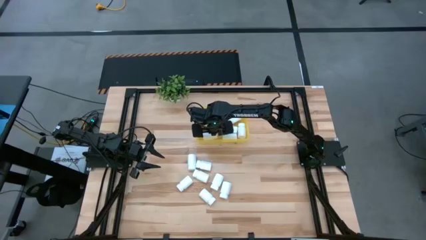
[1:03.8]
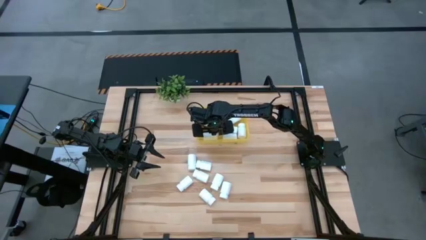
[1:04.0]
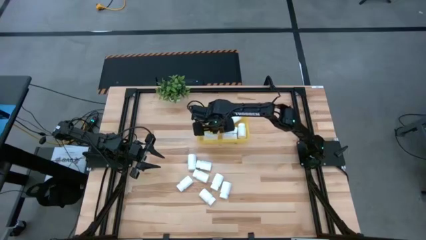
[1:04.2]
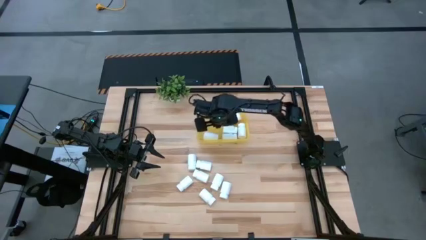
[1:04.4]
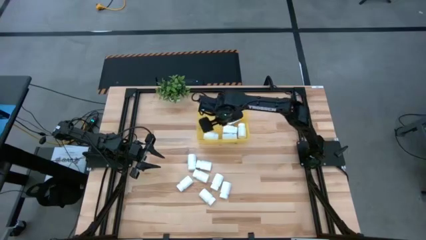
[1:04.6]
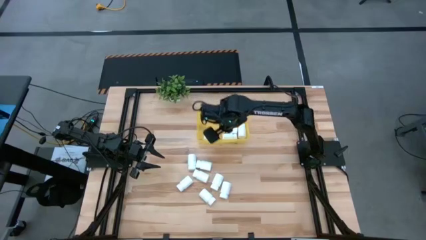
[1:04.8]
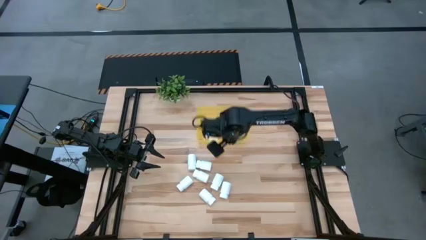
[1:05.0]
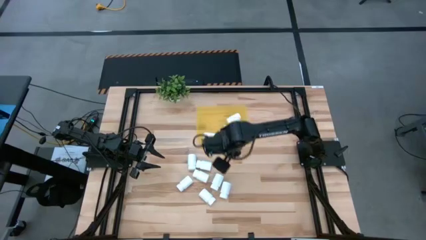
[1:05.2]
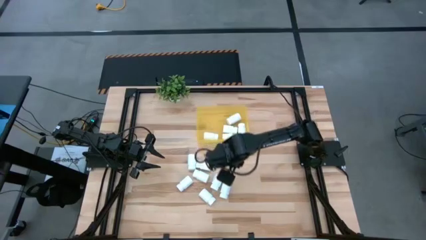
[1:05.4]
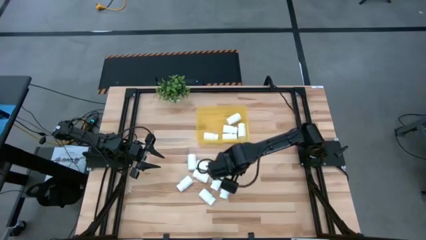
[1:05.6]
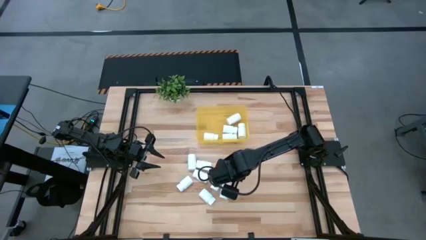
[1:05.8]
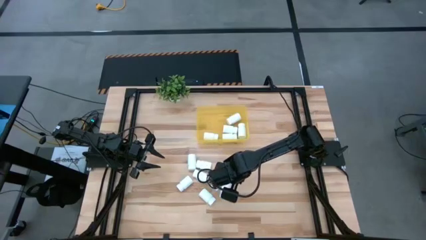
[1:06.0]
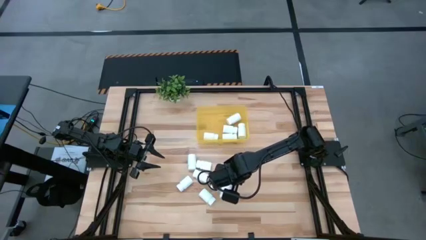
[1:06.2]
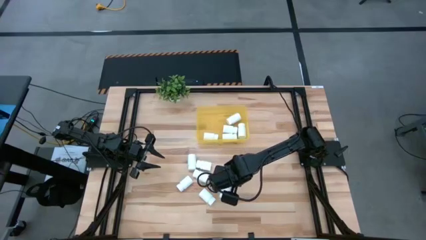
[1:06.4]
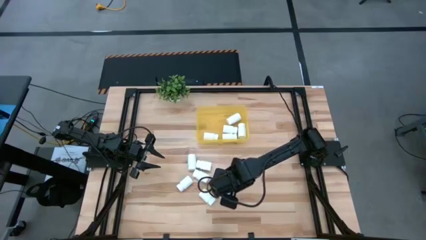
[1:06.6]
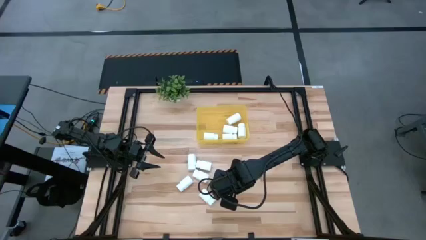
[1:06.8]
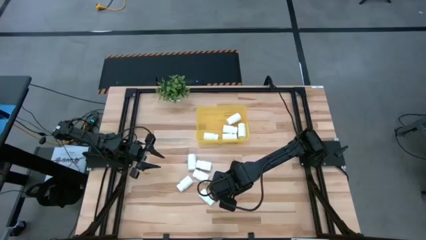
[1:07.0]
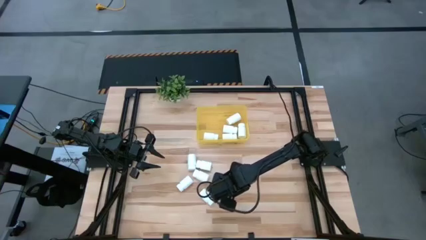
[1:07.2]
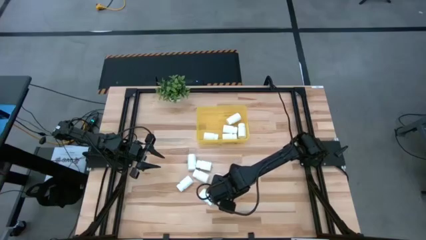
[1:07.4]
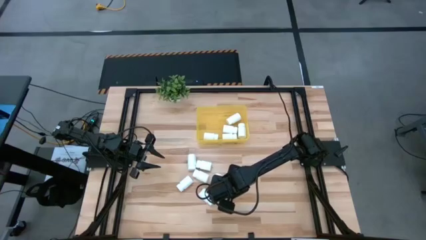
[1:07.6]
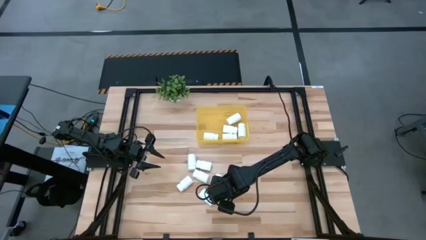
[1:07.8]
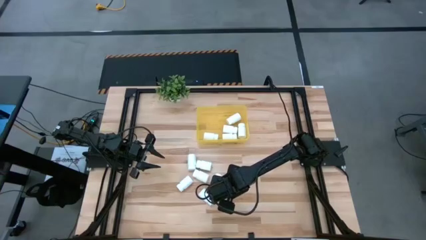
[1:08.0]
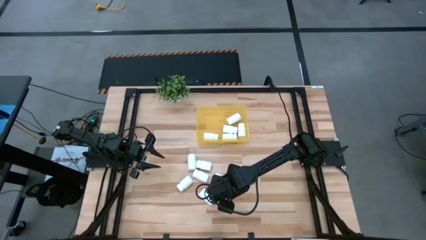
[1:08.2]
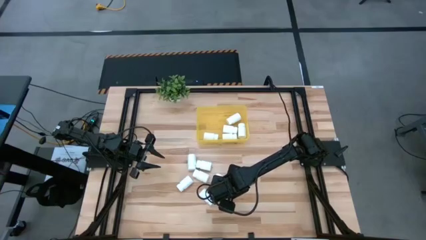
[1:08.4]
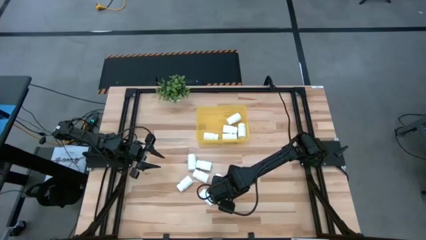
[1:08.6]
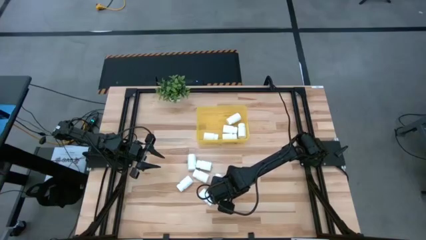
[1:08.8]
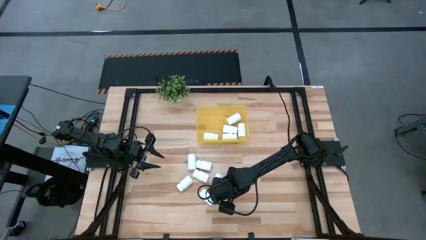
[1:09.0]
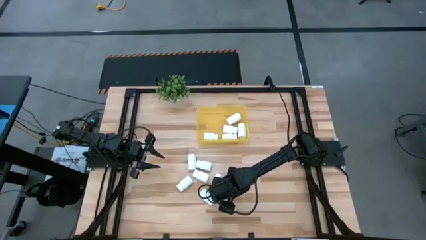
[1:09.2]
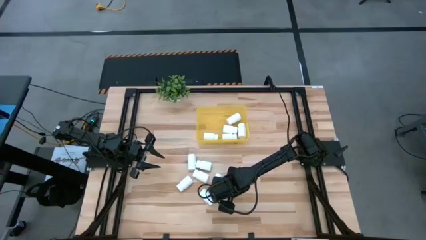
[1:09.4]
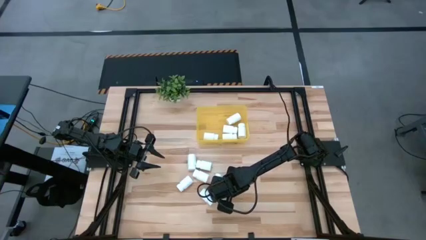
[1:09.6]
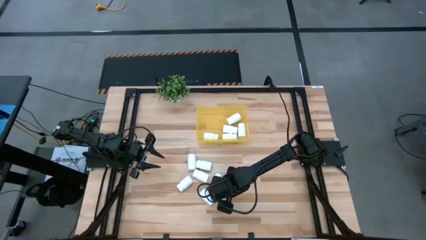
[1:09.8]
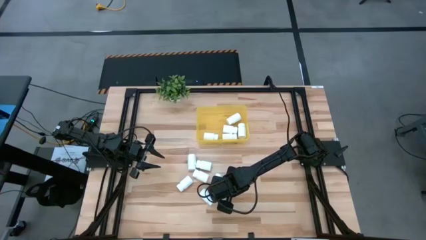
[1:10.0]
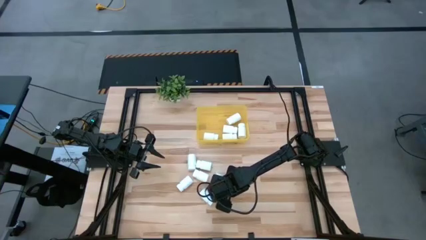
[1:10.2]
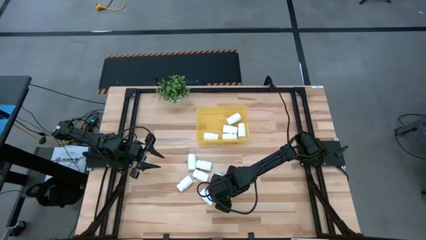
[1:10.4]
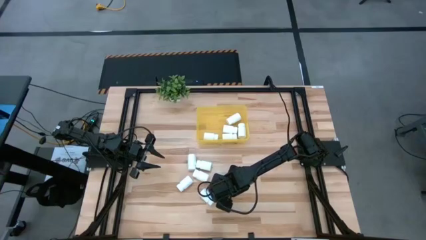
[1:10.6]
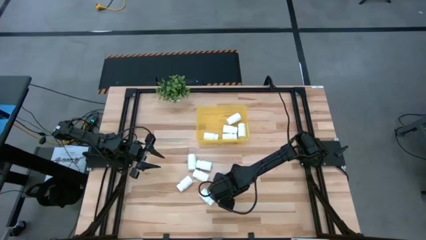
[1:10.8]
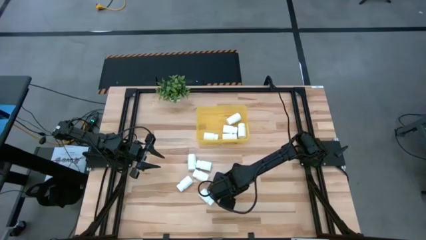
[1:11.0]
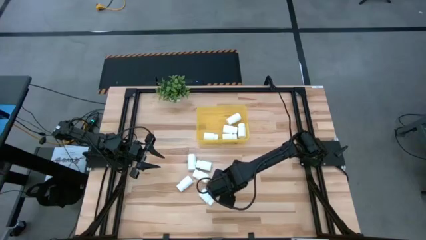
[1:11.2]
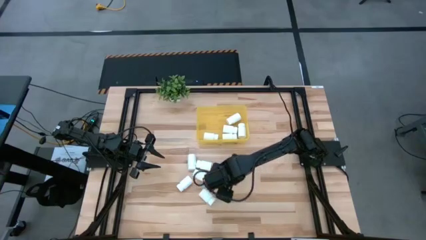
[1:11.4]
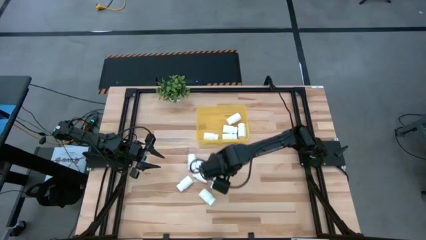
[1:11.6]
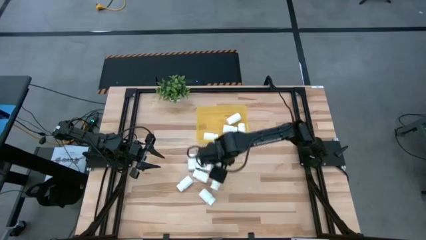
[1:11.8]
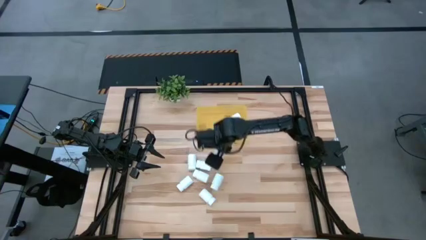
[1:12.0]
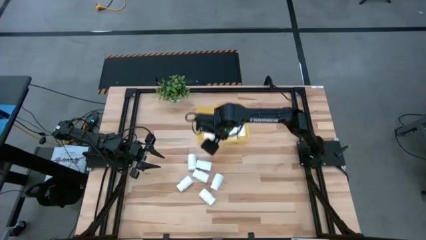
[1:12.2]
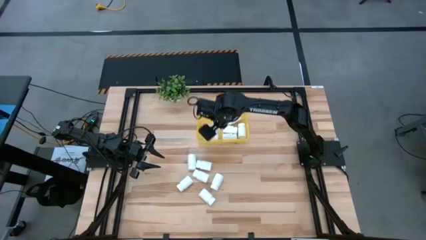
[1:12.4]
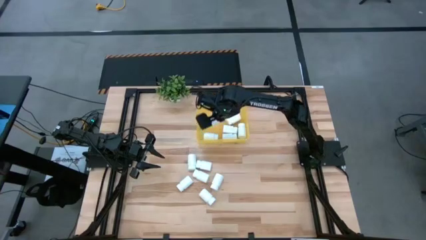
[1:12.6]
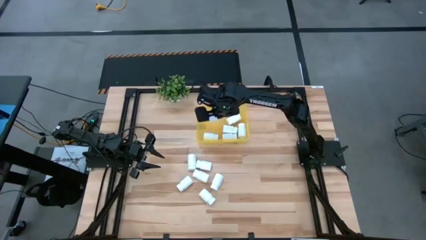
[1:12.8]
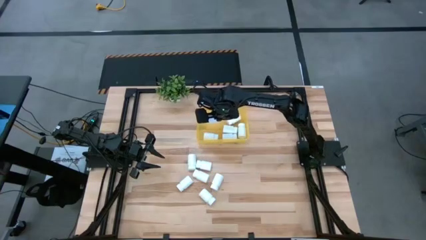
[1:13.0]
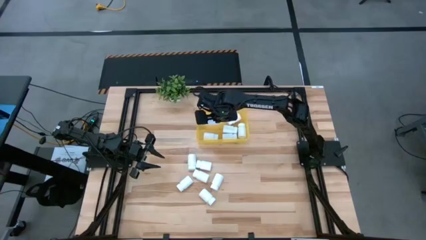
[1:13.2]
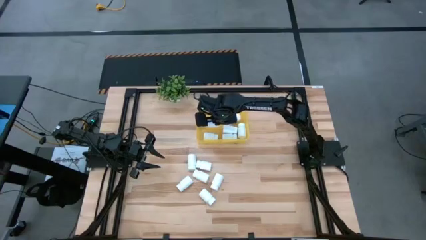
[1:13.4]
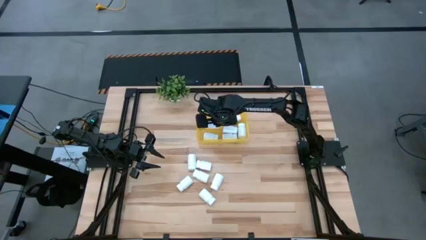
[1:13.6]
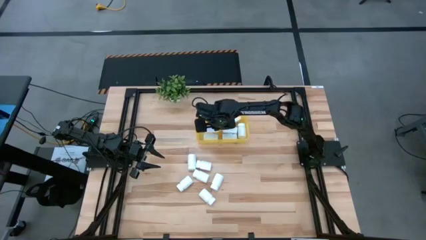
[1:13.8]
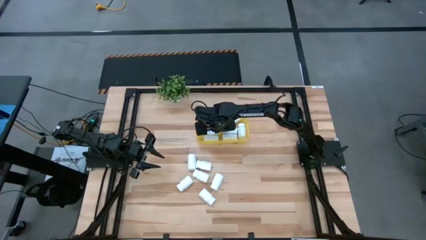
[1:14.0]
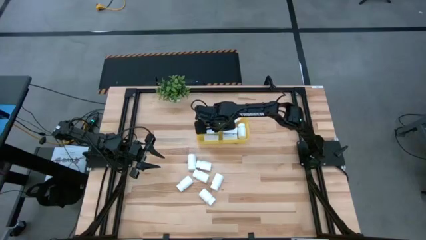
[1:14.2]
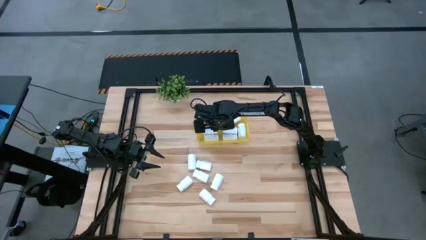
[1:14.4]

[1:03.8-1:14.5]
Task: Pick and place pill bottles into a basket
Put the white pill bottle into the yellow bin

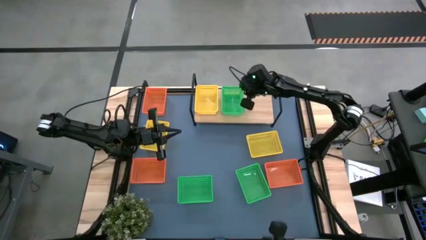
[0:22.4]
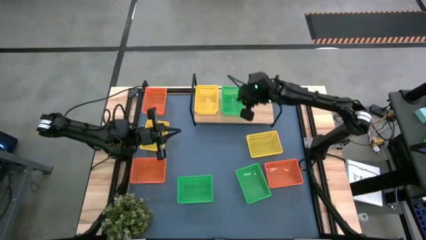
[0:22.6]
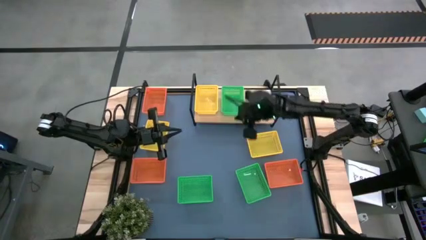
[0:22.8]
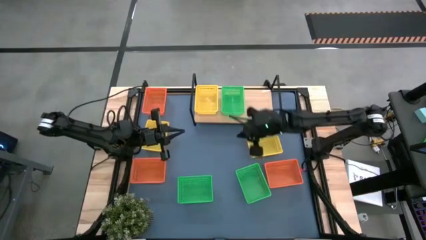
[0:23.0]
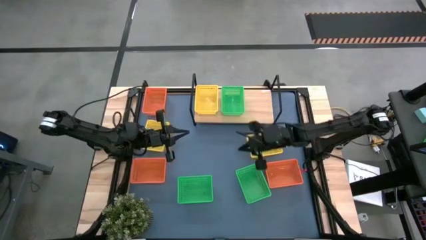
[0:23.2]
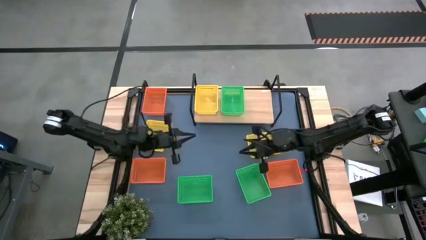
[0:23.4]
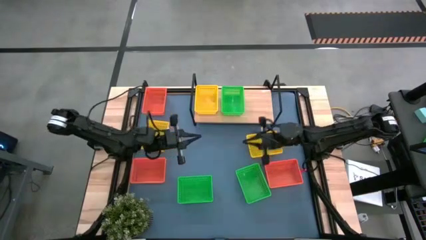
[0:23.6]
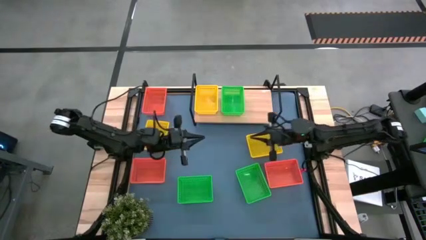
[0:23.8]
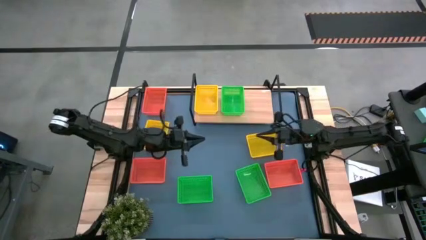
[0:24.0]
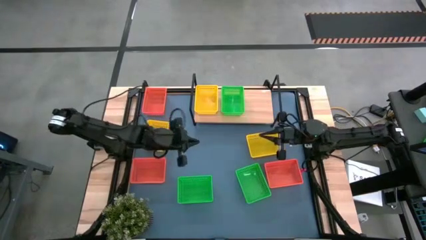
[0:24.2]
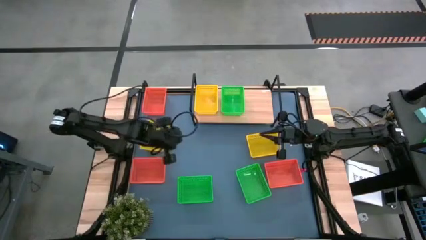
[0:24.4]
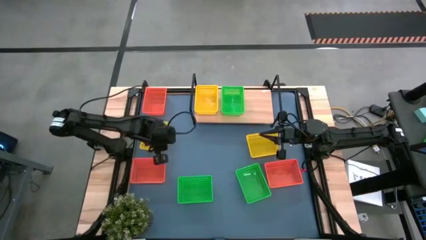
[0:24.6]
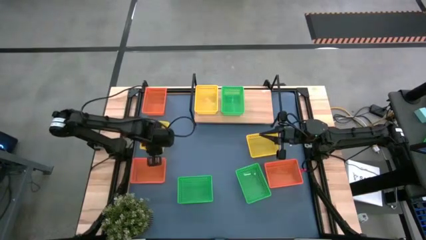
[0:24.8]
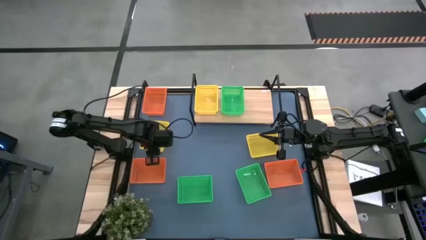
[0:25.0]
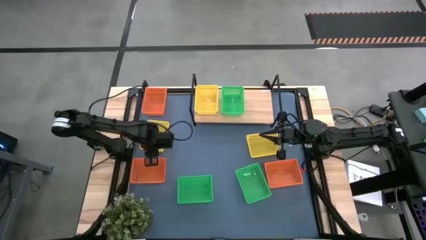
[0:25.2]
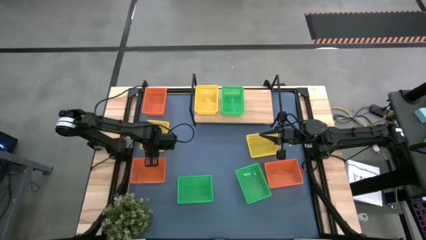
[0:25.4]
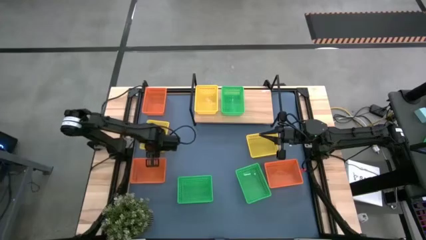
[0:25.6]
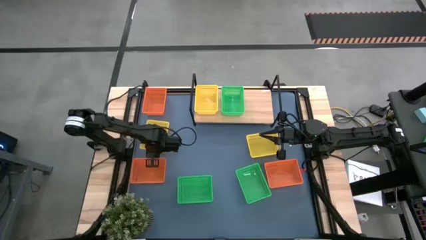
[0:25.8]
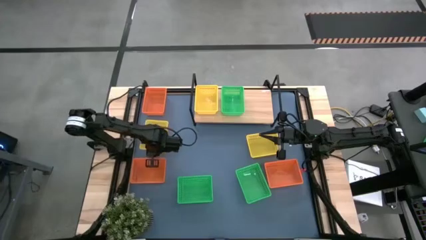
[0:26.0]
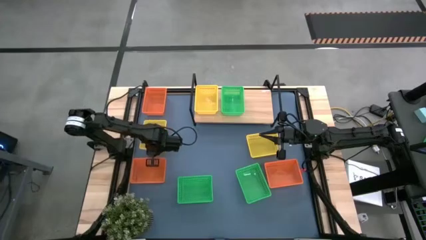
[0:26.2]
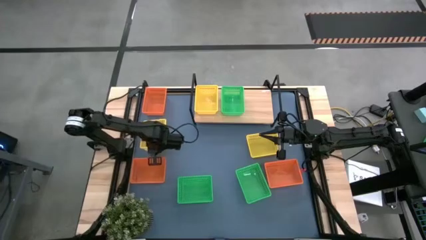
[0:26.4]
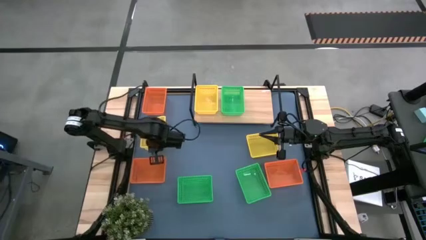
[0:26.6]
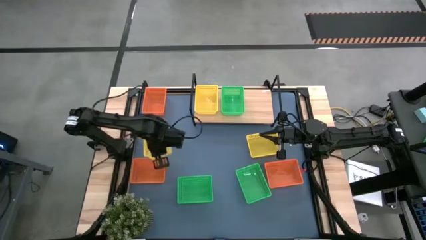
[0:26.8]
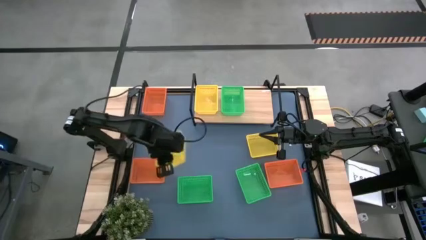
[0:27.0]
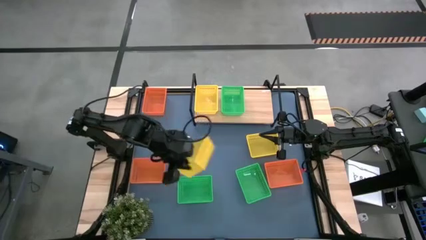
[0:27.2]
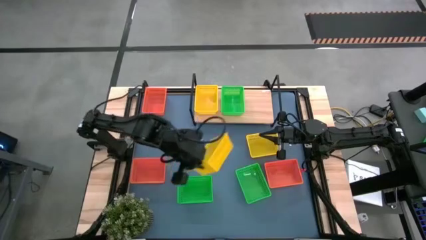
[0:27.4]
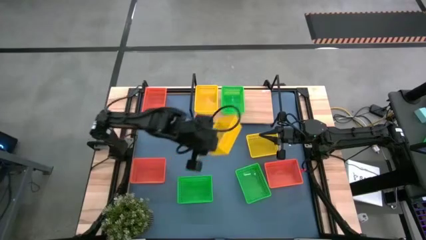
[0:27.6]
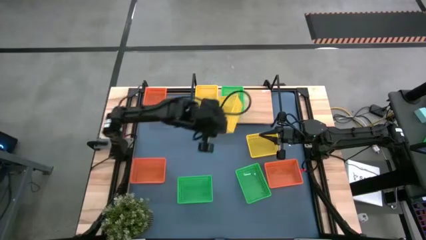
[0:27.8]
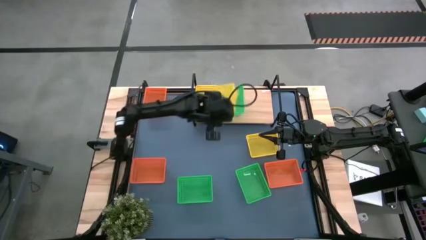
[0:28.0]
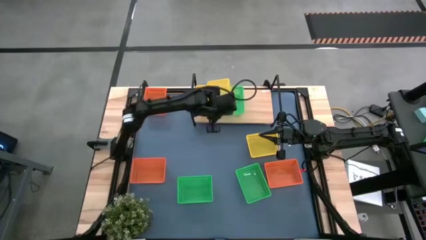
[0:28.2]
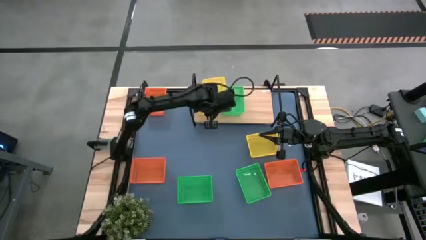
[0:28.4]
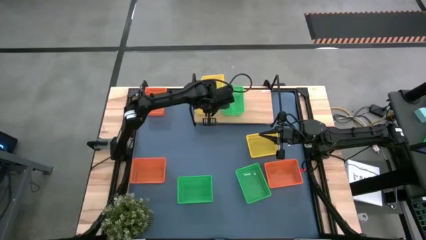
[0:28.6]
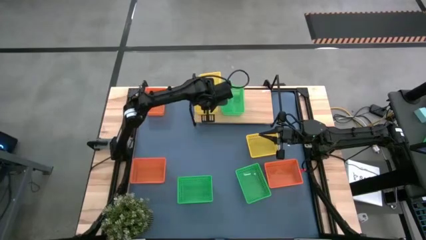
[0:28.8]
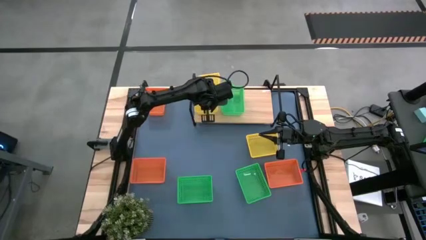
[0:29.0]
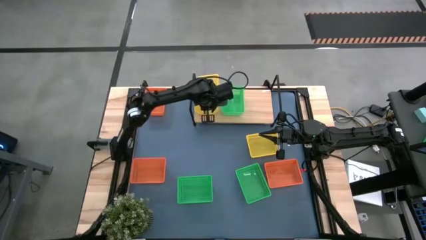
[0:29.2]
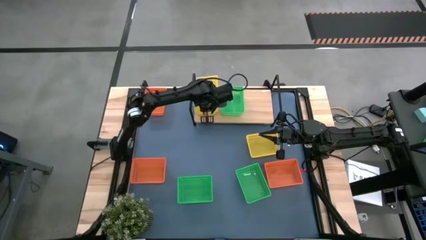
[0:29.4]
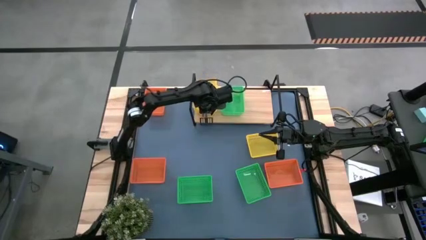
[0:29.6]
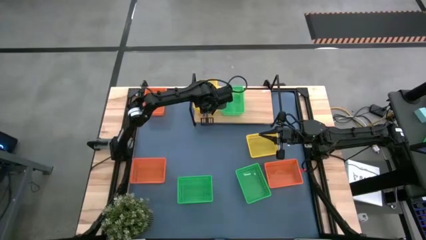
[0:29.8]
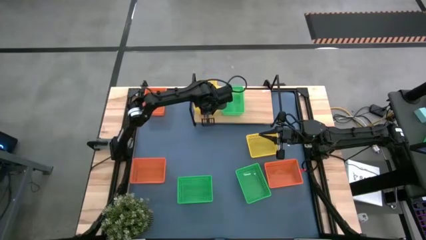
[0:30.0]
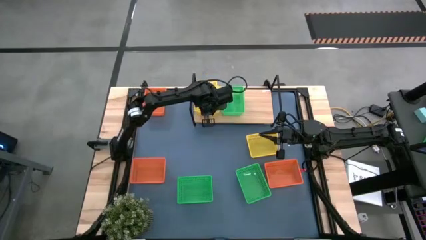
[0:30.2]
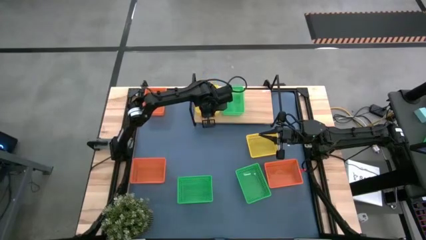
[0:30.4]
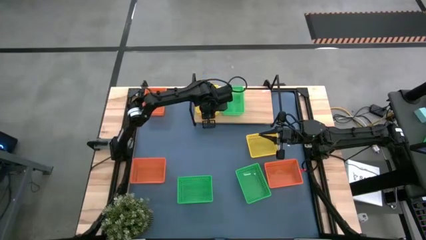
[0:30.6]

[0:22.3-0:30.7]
Task: Stack baskets on shelf by color
Stack the left yellow bin on top of the yellow bin on the shelf
